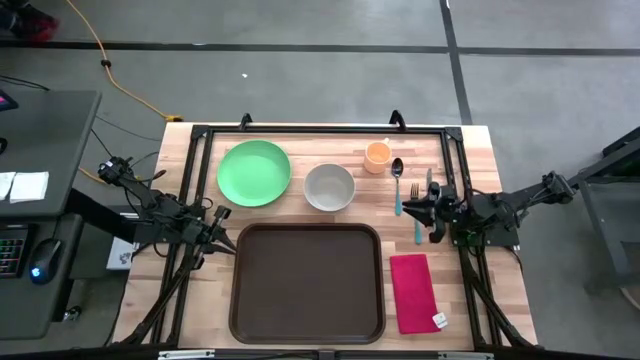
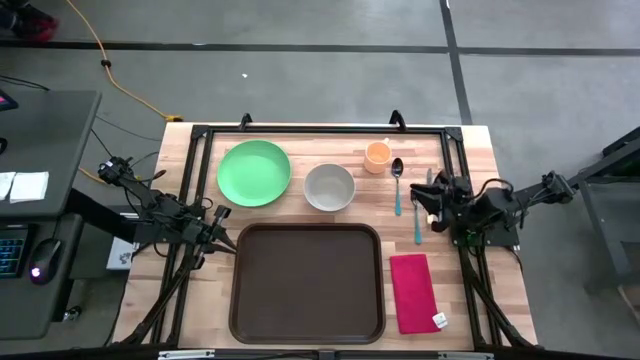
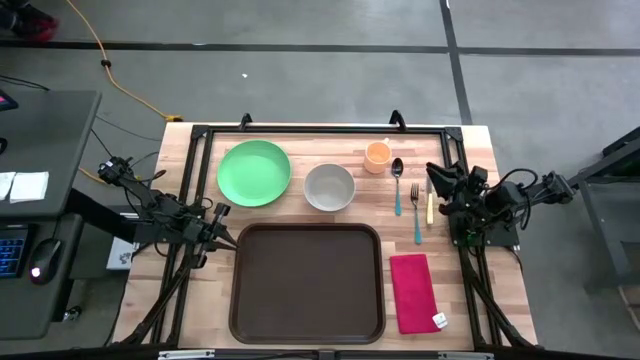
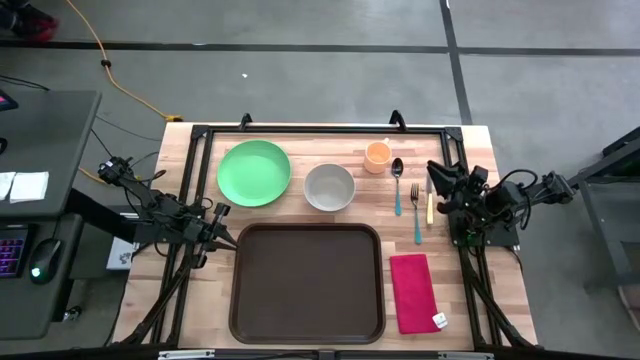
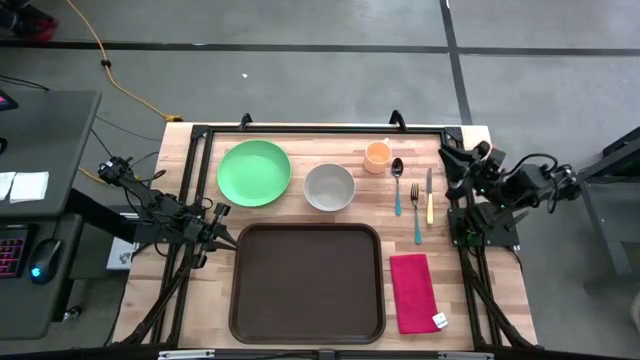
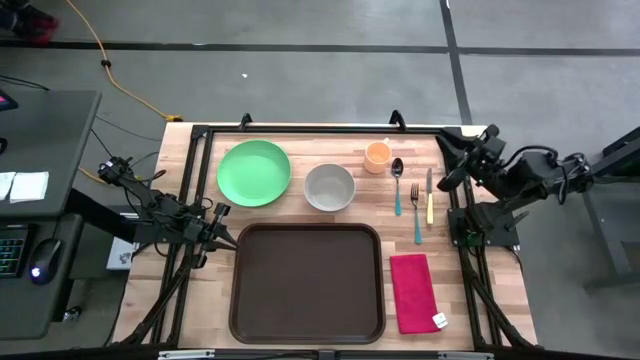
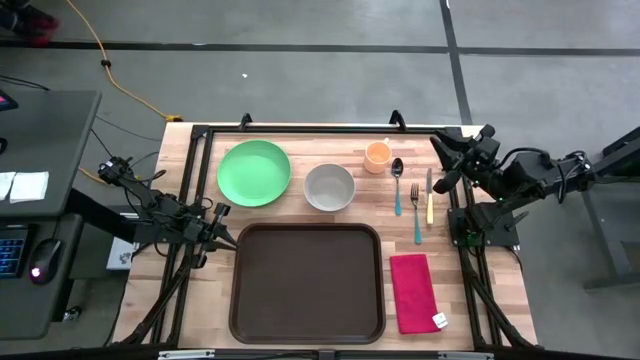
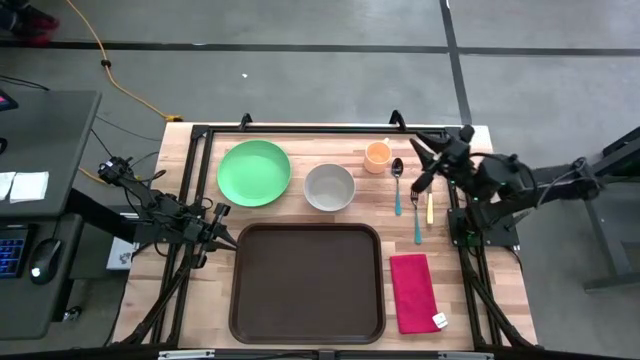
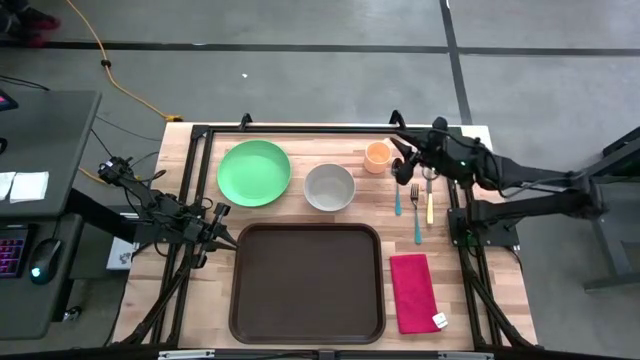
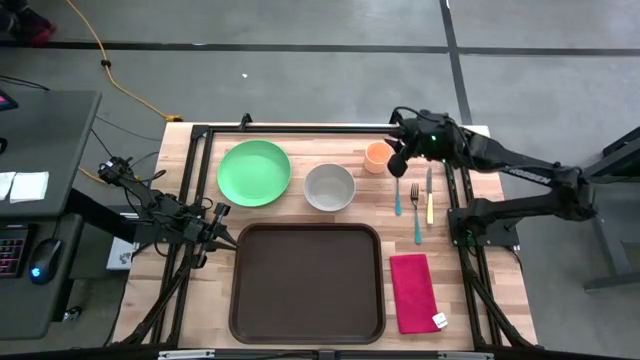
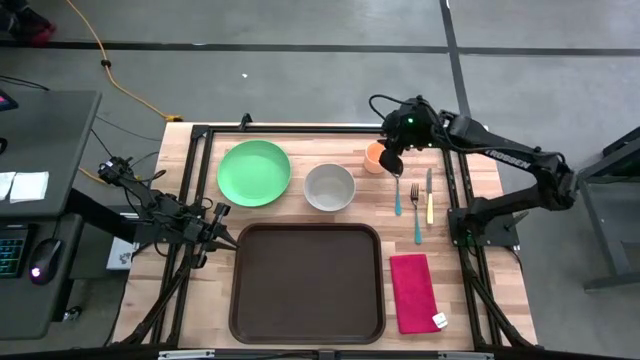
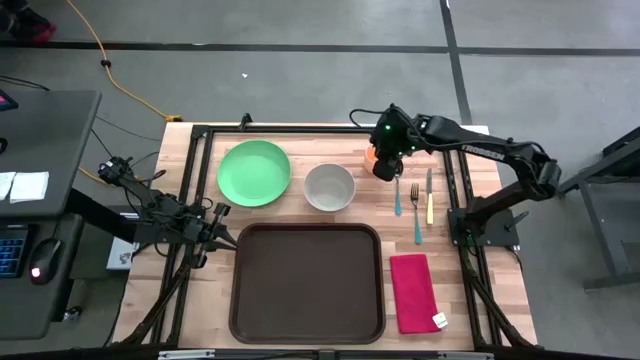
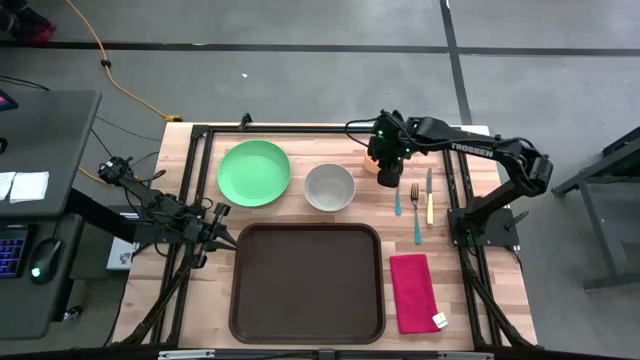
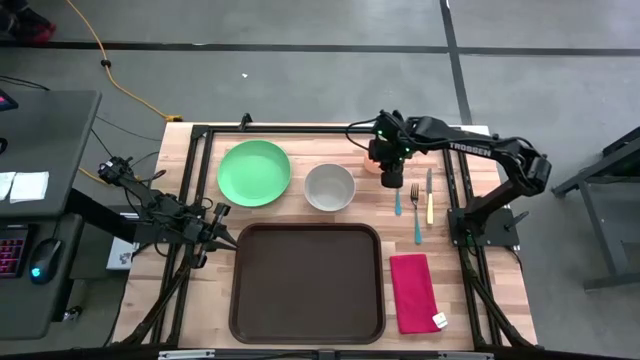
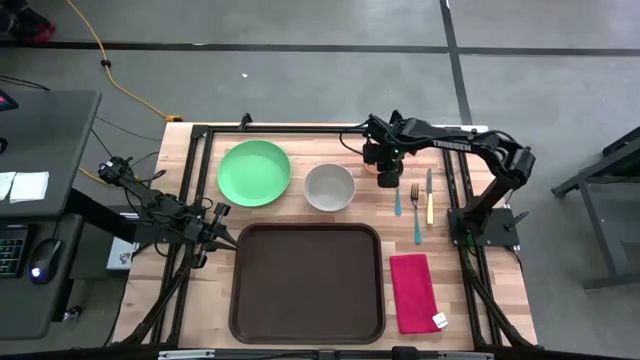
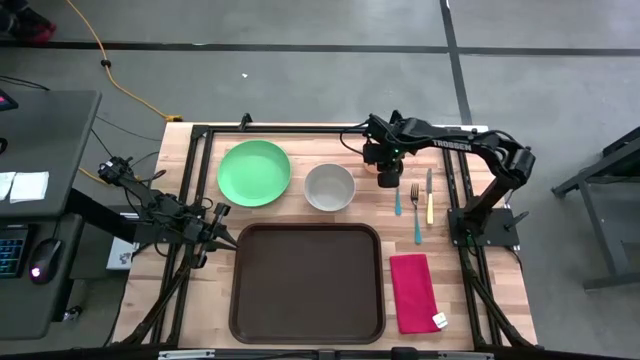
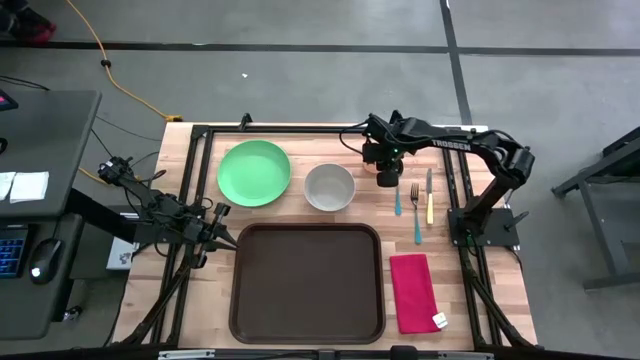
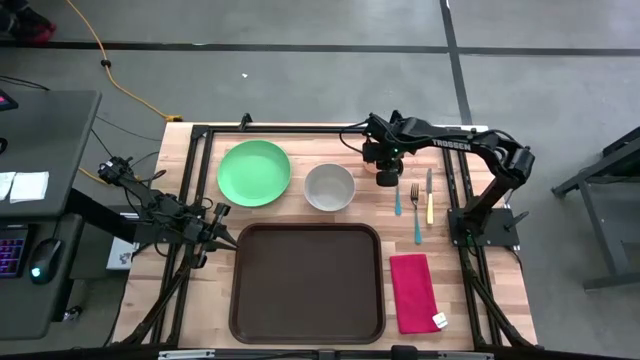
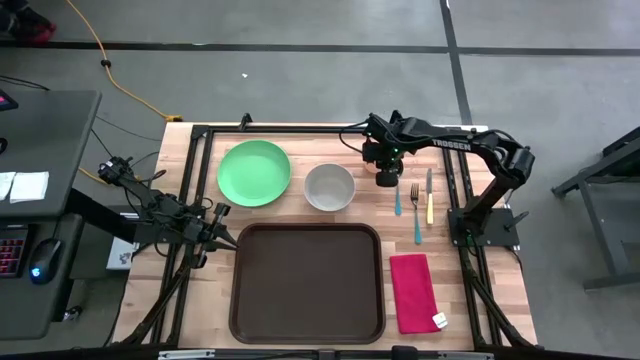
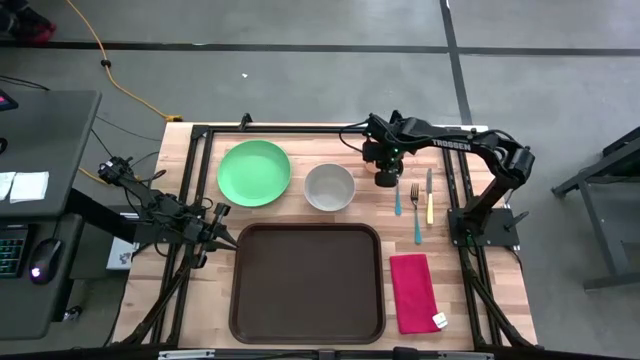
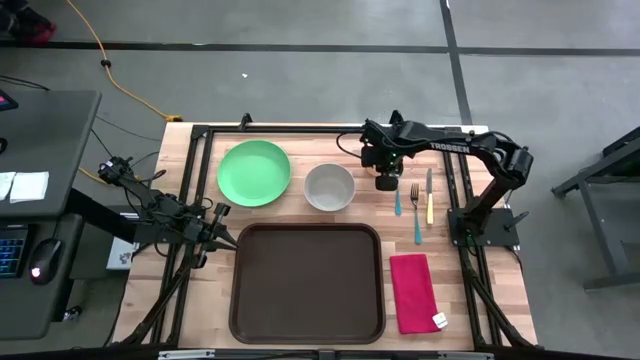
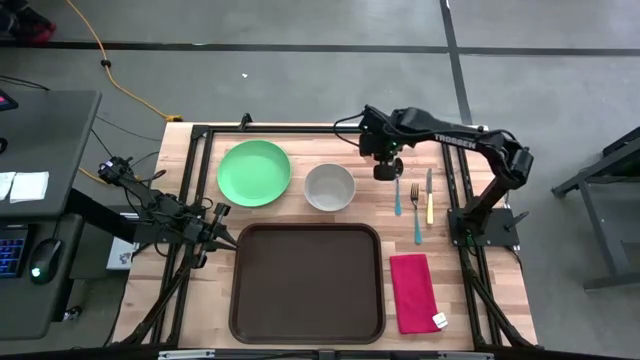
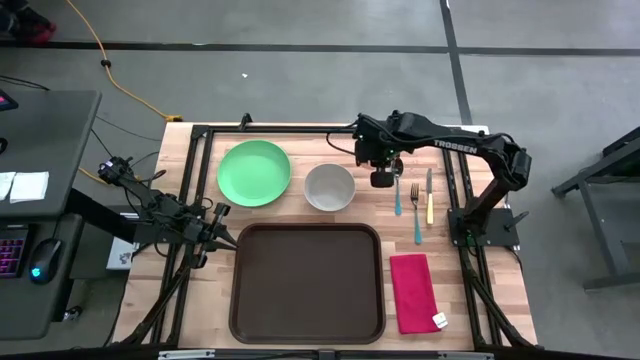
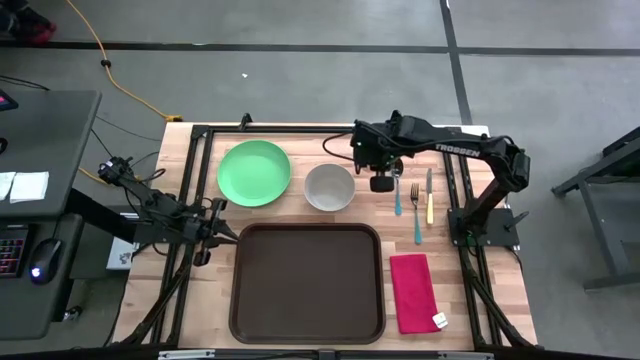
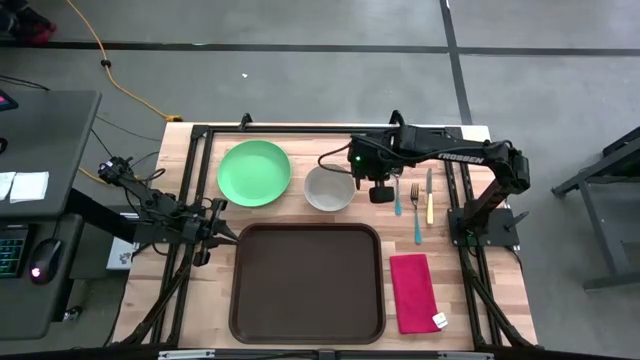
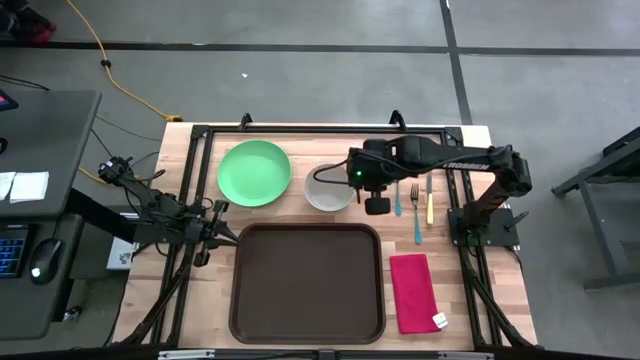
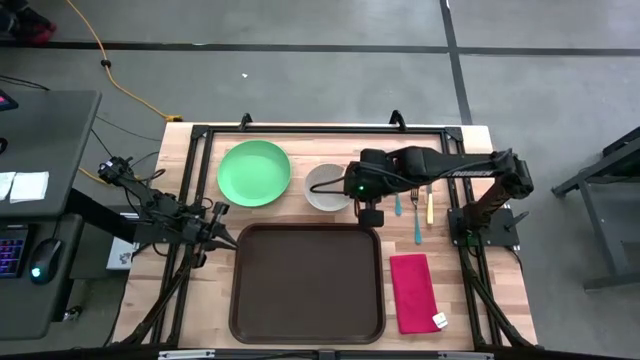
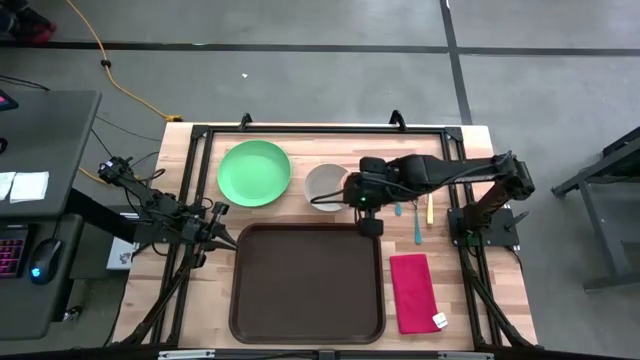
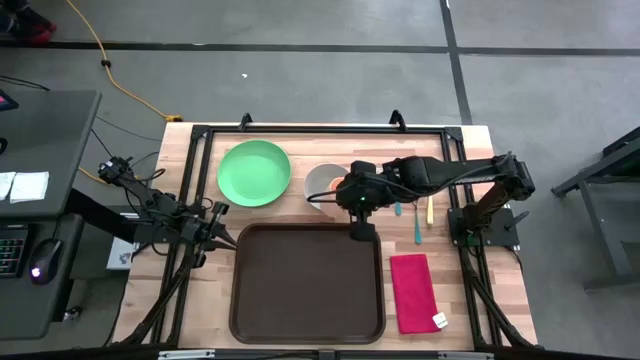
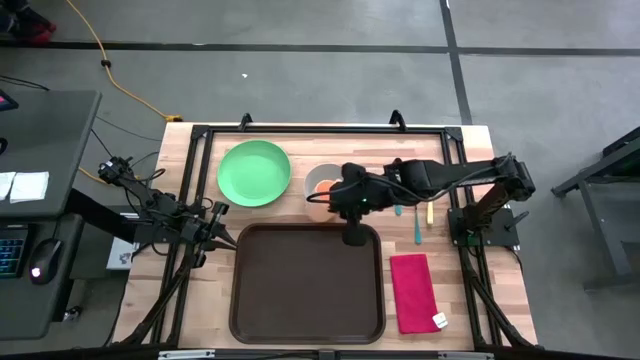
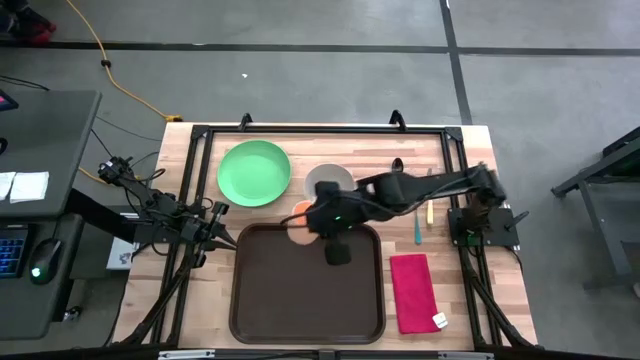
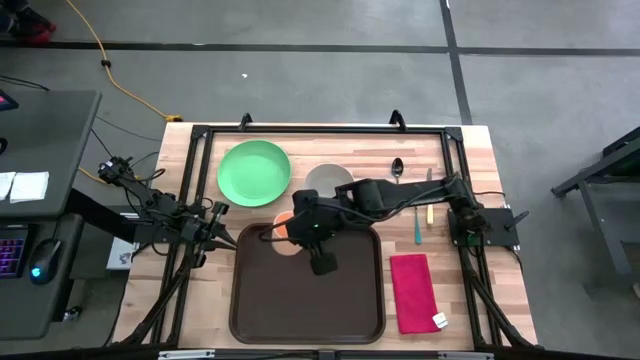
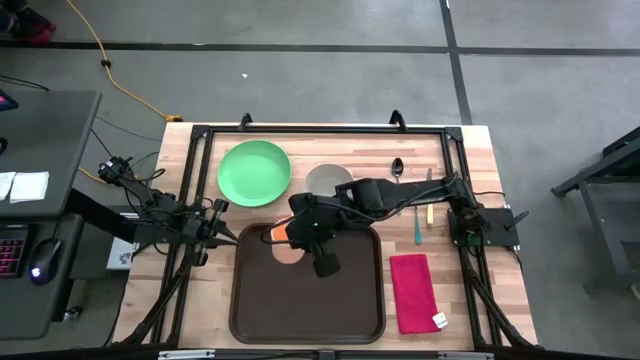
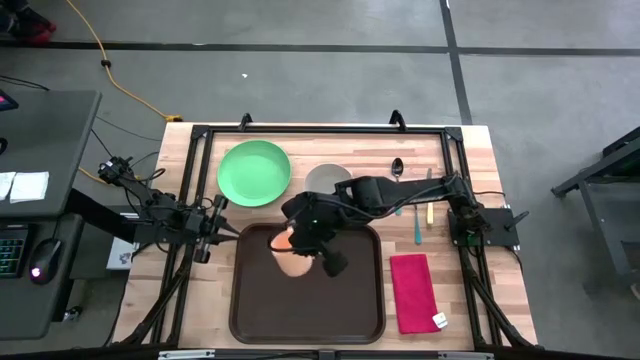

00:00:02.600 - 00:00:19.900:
Task: Set up tray
Put the light orange mug on the top left of the brown tray

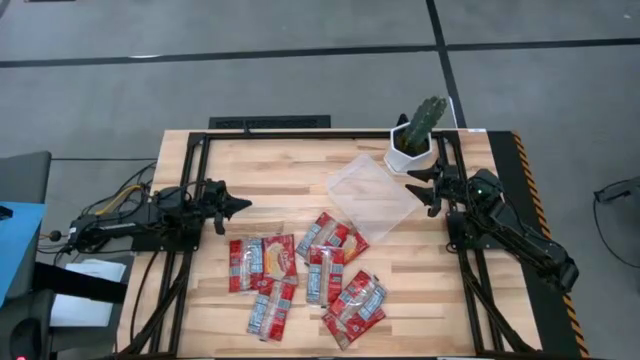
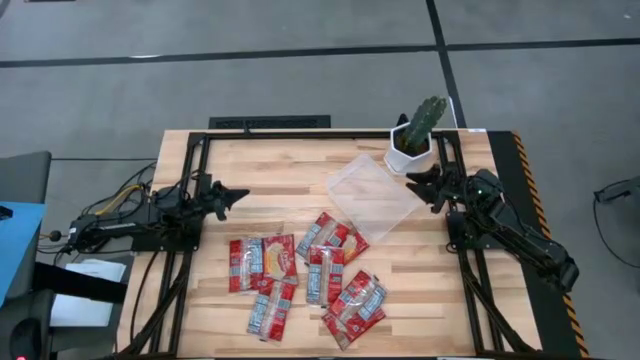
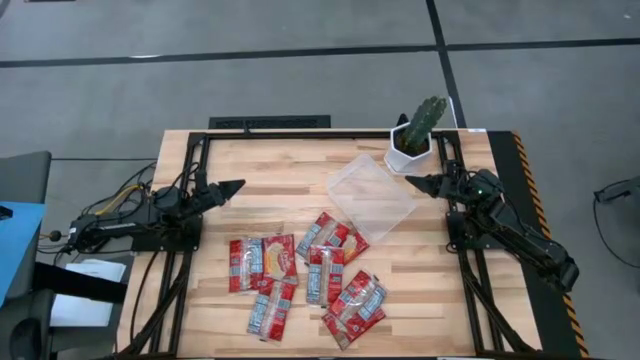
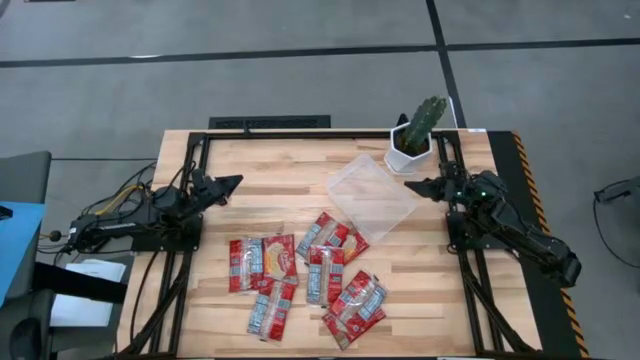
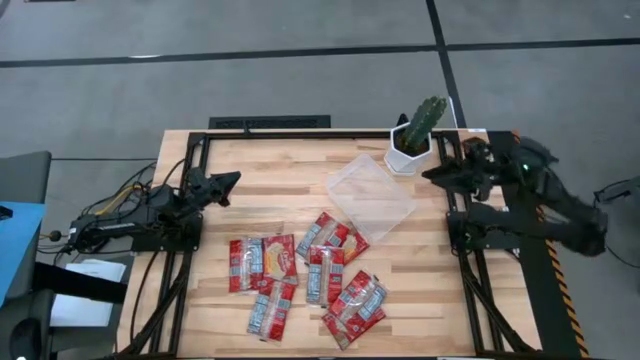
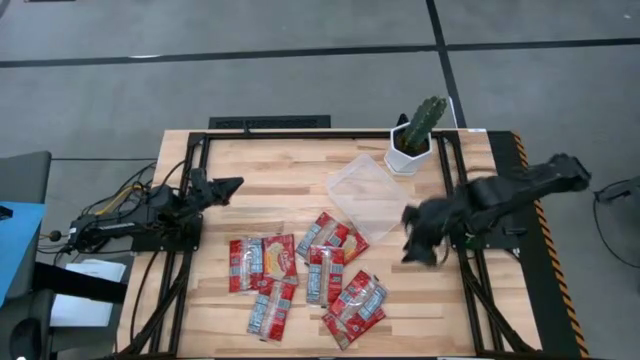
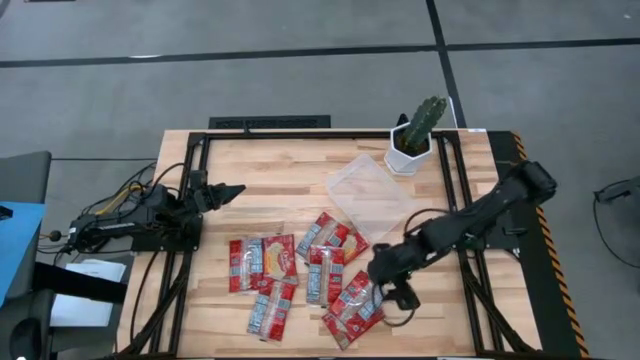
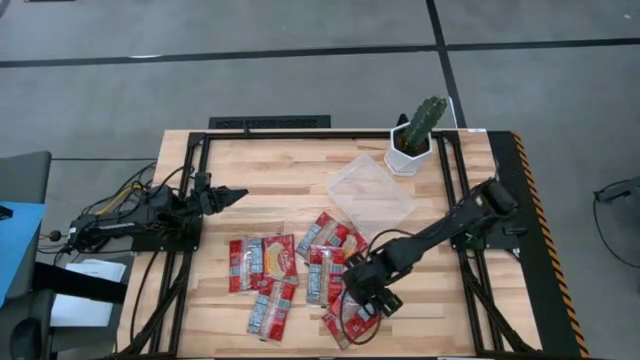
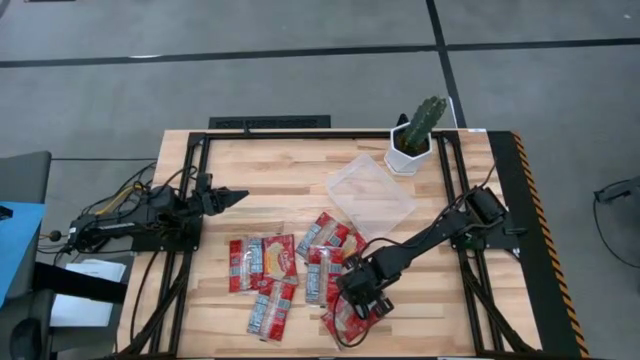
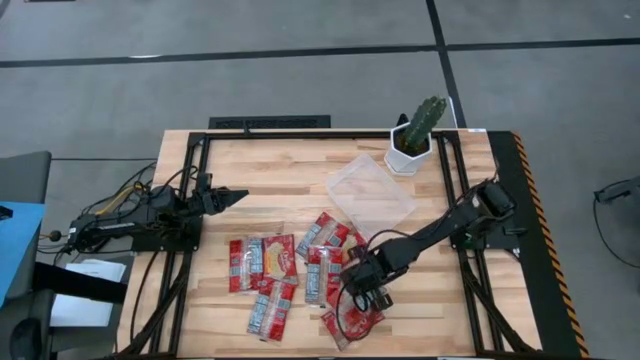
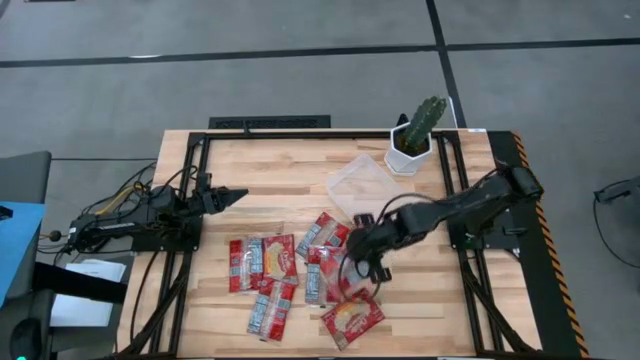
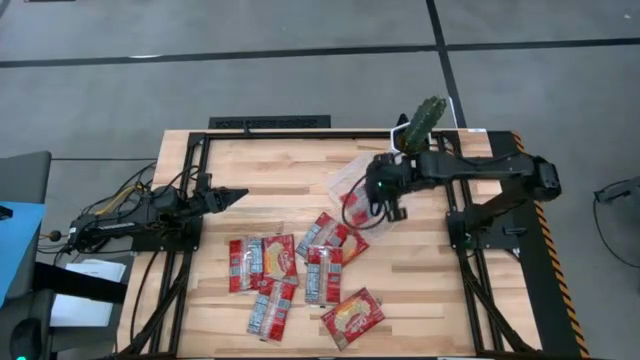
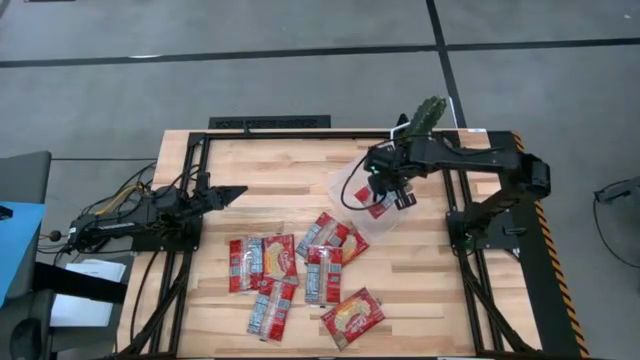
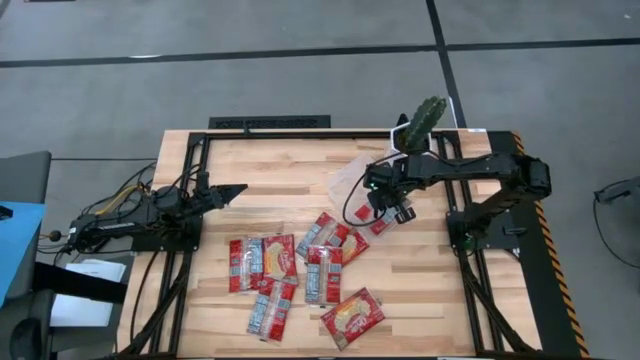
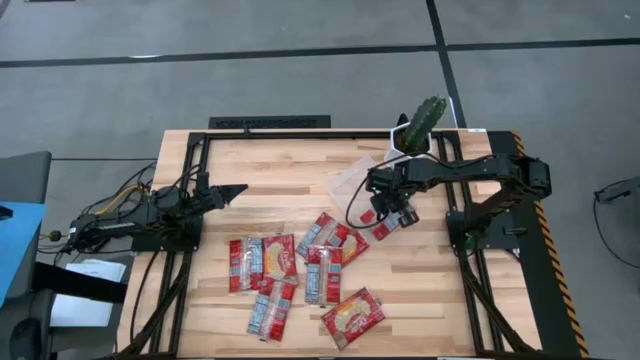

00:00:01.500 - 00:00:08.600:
Task: Sort popcorn bags into baskets
Put the red popcorn pack into the transparent bin
